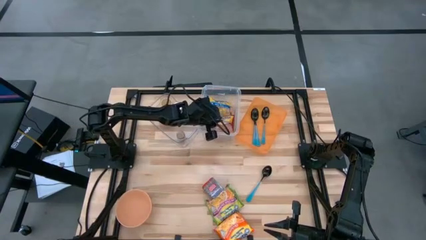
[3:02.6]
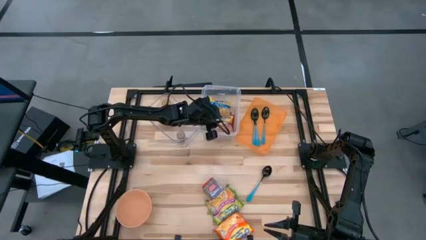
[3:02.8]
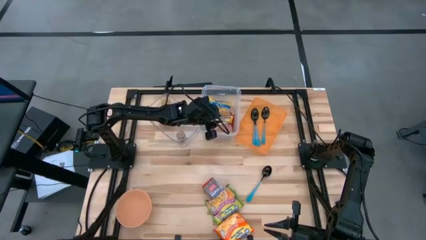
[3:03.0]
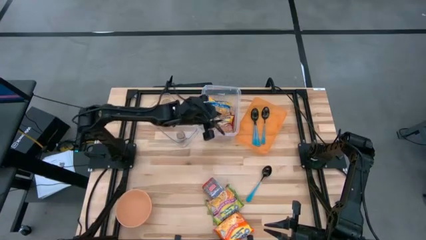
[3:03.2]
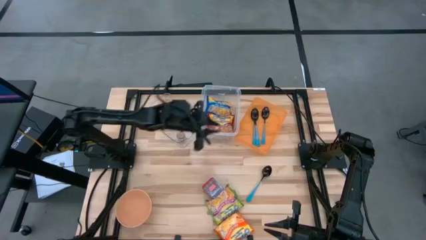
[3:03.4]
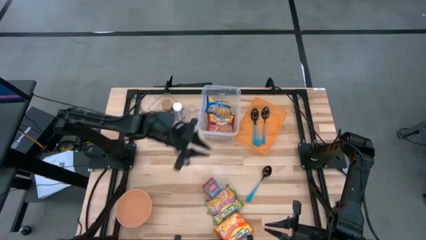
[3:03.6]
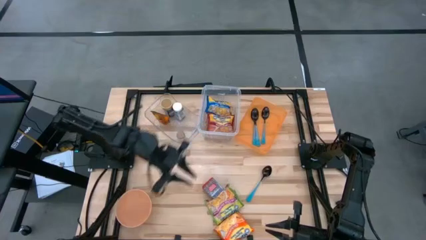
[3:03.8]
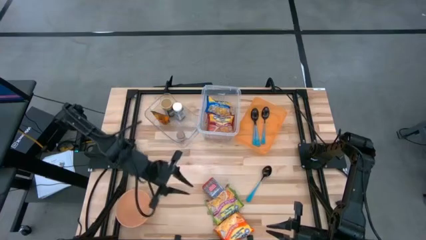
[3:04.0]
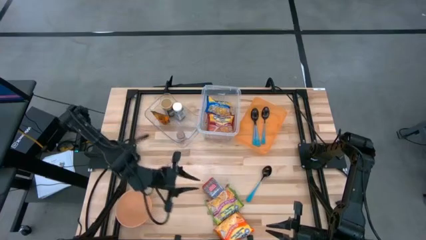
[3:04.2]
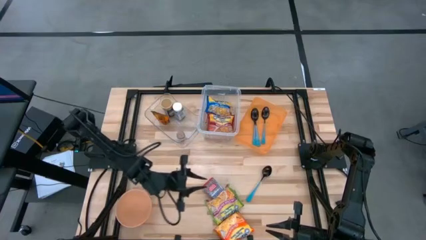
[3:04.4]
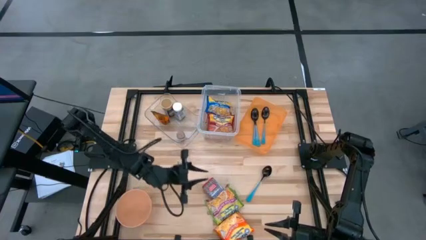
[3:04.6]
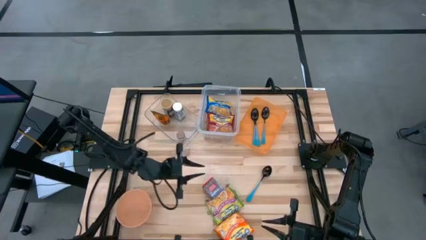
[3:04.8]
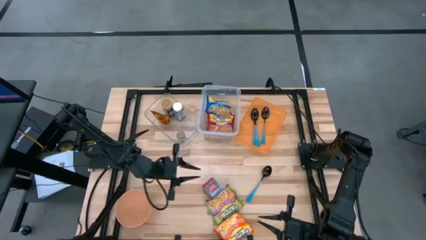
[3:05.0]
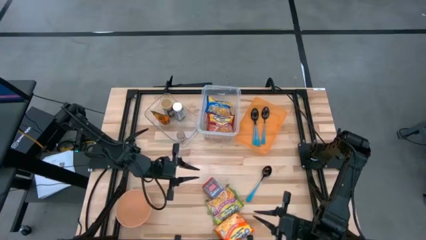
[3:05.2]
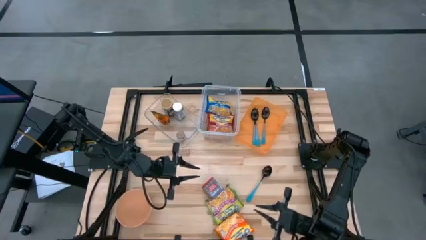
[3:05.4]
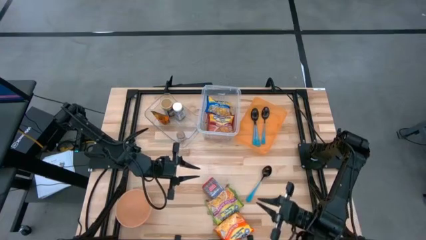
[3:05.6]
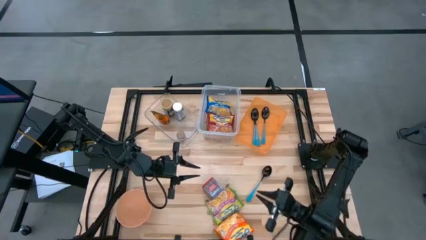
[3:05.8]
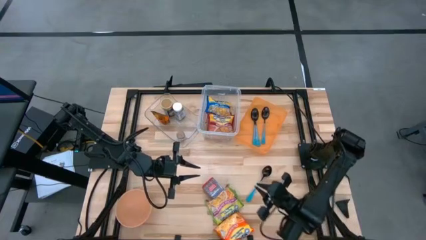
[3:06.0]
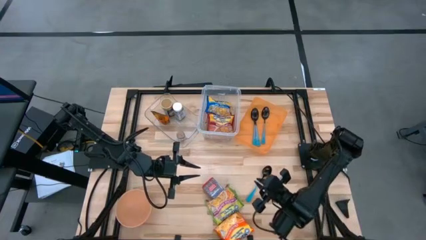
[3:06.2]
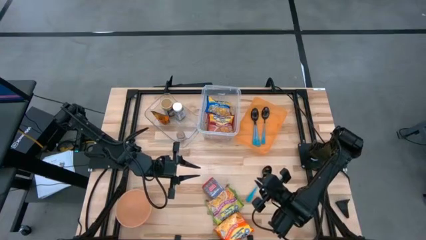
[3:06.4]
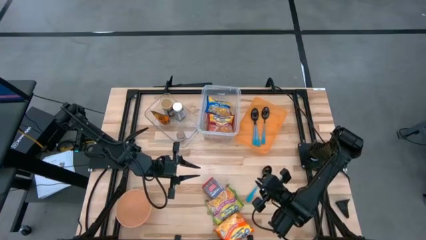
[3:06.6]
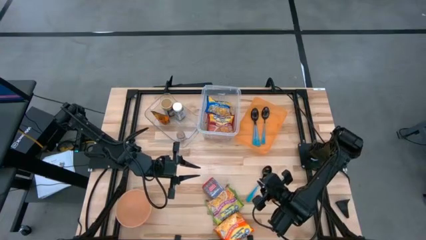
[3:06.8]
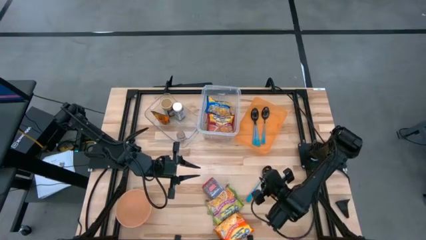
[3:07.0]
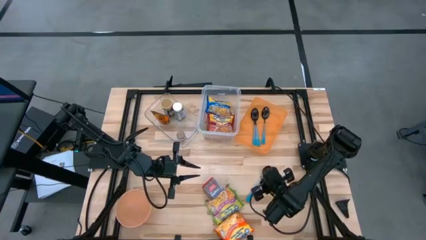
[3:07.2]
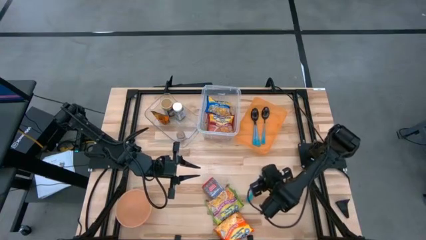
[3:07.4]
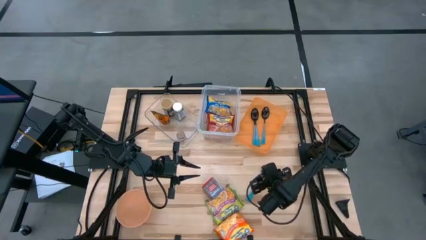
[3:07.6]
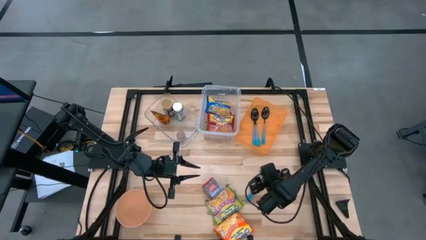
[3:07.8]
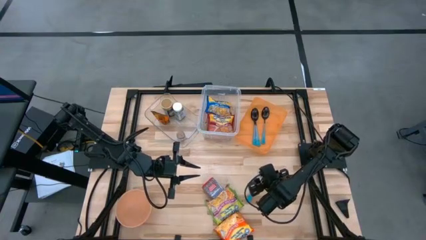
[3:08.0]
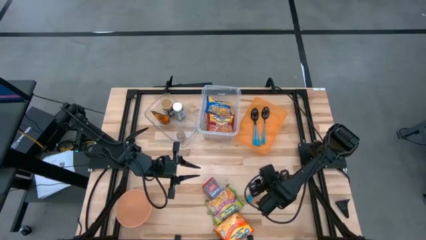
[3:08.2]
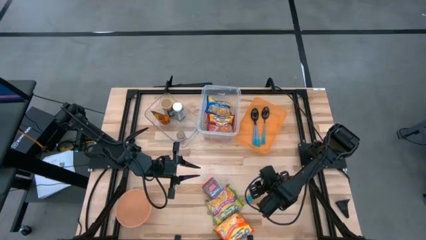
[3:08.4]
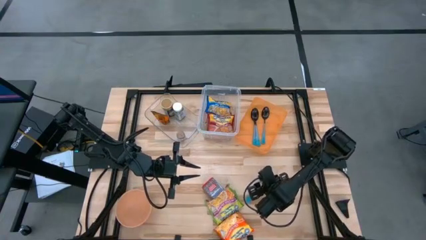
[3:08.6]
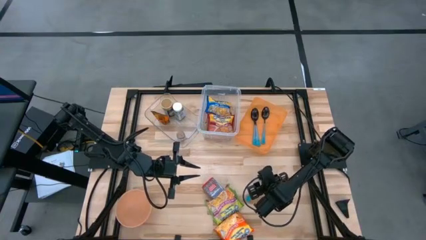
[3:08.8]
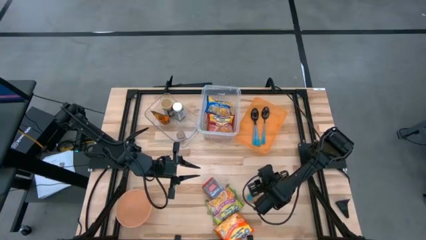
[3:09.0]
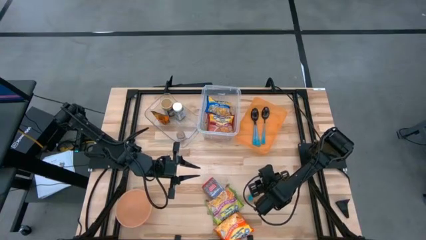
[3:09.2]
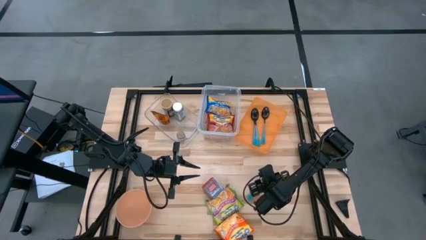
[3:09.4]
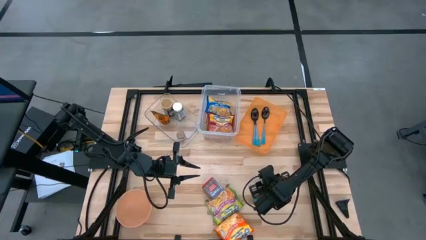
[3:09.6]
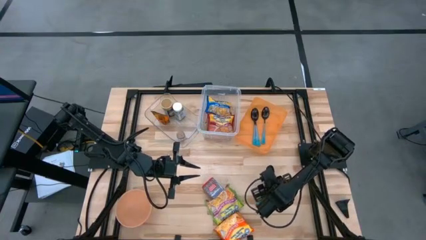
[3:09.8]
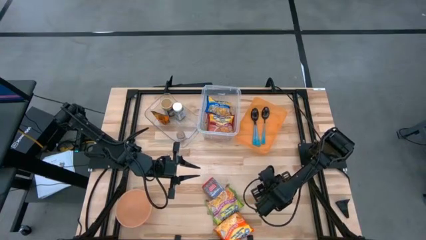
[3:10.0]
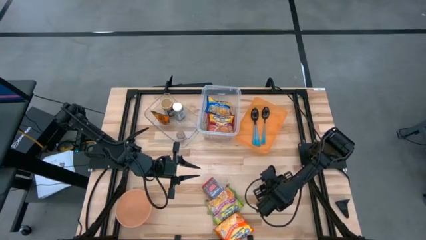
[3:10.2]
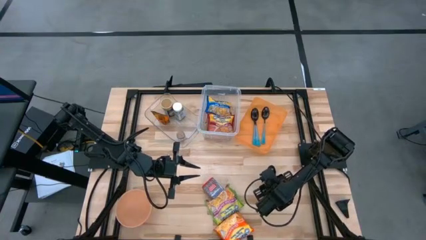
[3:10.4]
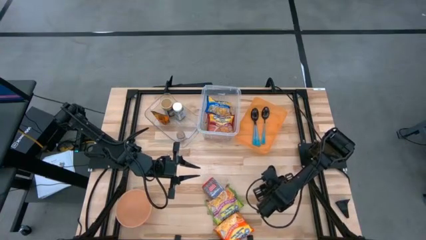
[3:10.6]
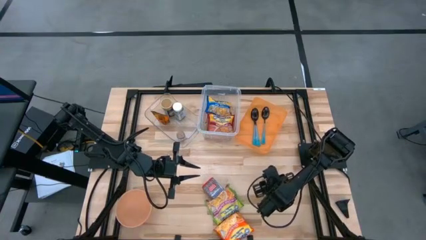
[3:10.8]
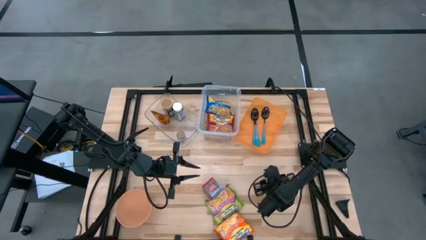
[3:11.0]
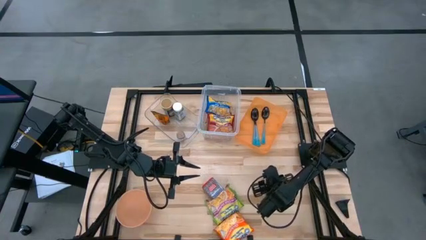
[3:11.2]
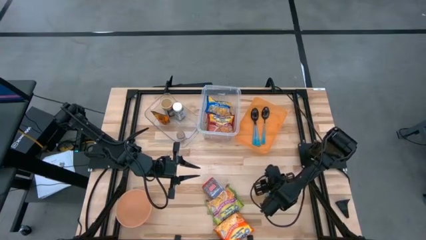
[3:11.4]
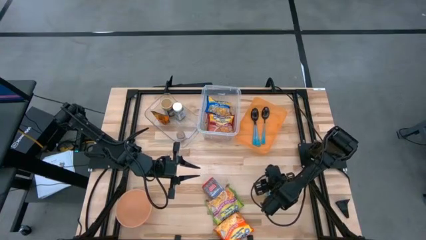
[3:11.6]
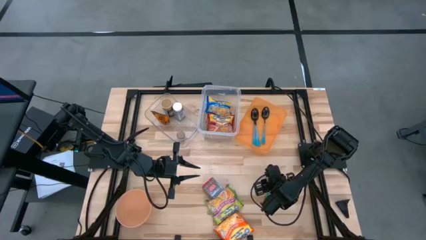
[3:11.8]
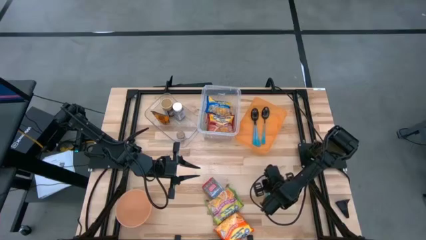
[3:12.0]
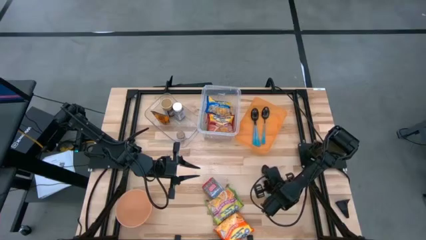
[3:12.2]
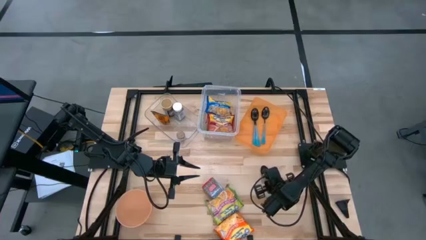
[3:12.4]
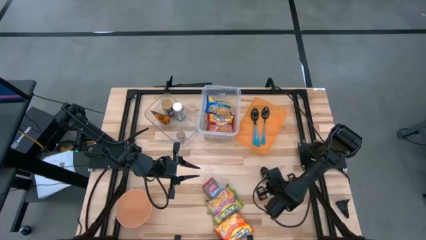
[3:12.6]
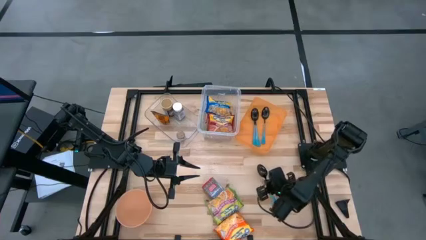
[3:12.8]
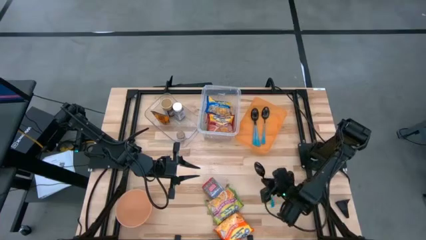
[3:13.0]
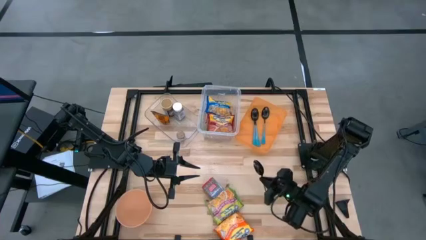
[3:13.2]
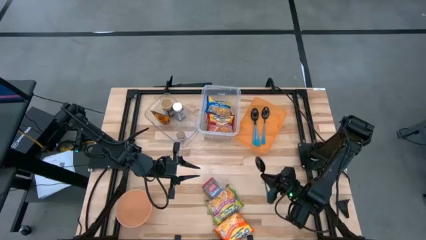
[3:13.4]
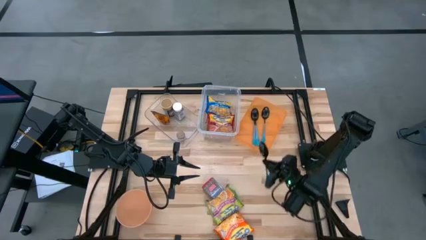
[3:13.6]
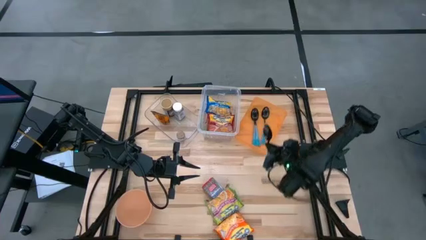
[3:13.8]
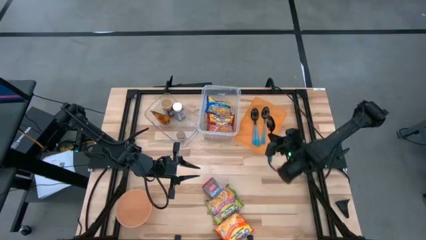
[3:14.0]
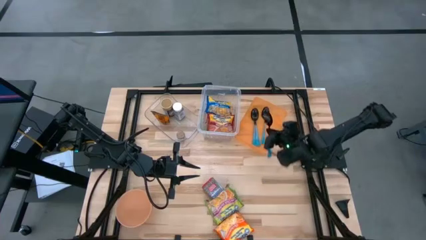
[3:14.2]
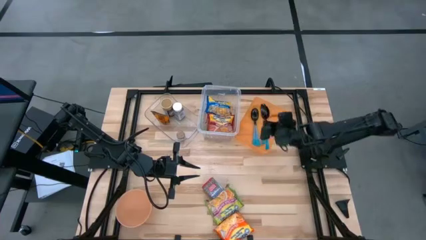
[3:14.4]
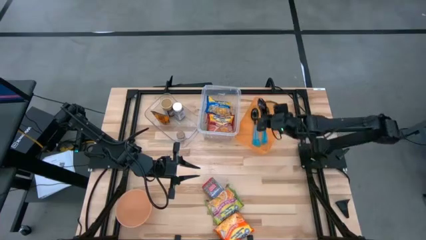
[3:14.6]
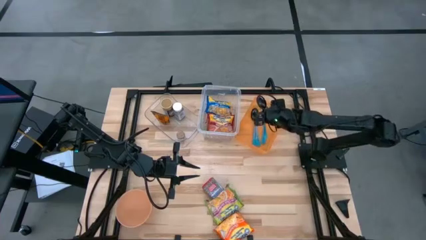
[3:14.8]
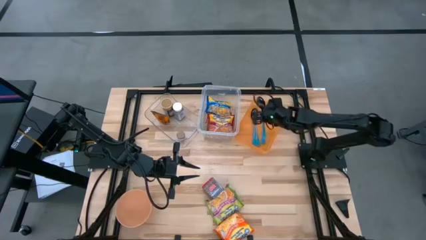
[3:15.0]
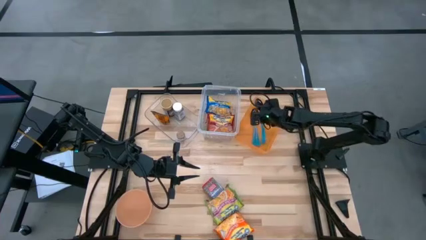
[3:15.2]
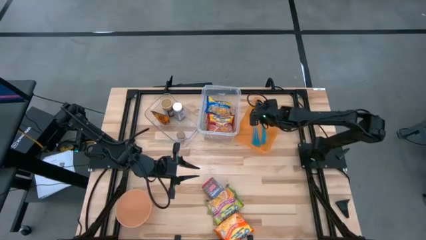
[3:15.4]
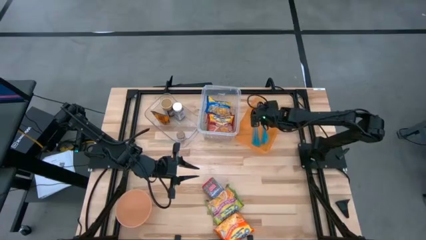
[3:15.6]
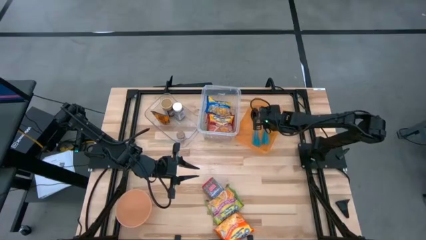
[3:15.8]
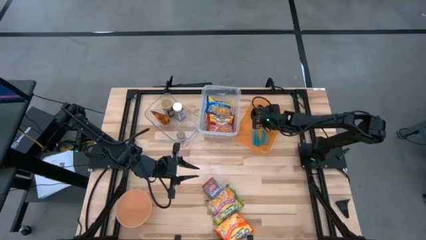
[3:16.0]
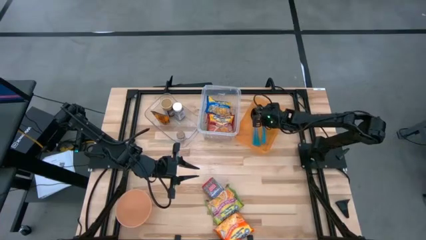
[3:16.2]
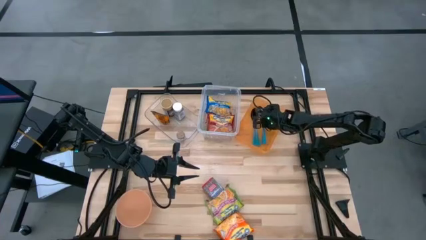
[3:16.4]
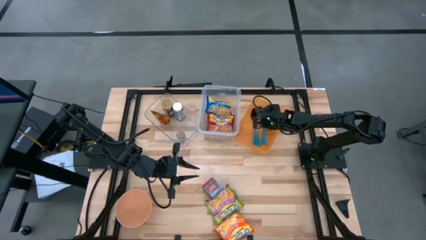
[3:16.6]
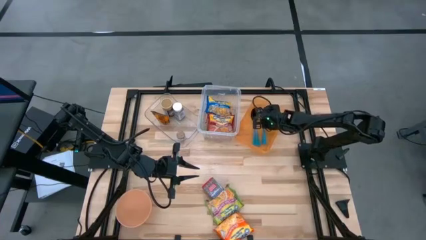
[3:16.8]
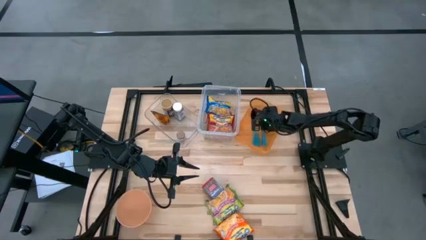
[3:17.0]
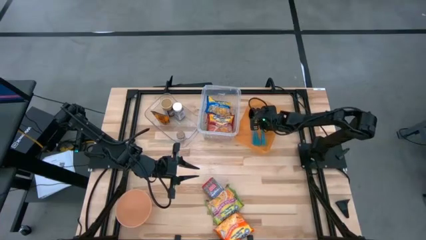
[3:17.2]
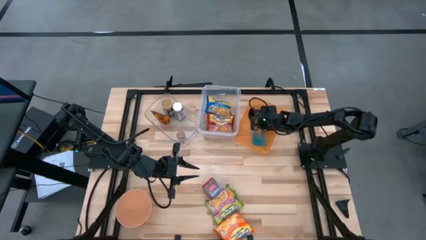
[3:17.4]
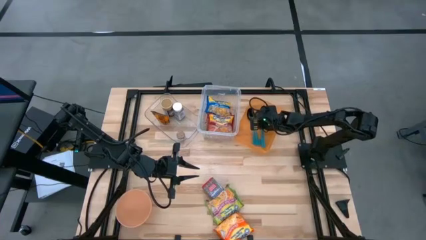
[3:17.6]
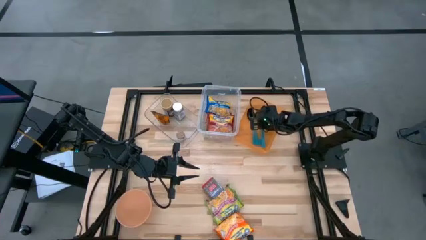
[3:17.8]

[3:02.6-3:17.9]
Task: Pick & Place Food Item
Put the blue spoon into the orange bin

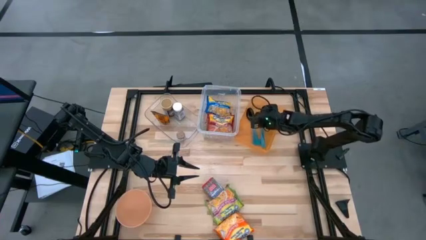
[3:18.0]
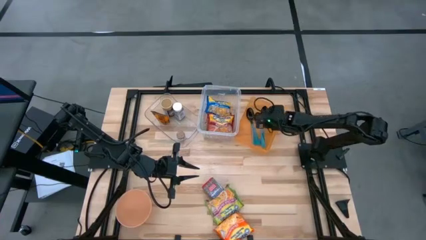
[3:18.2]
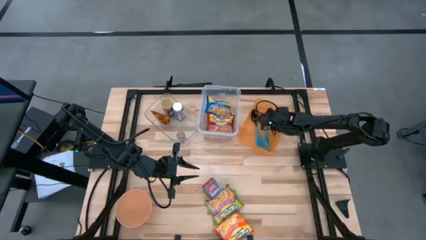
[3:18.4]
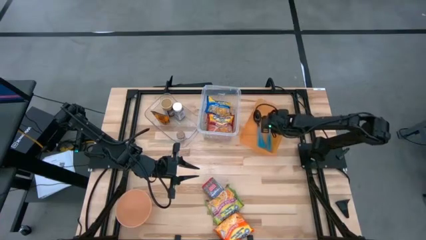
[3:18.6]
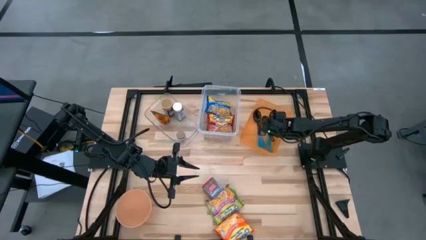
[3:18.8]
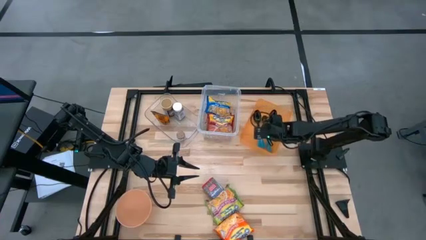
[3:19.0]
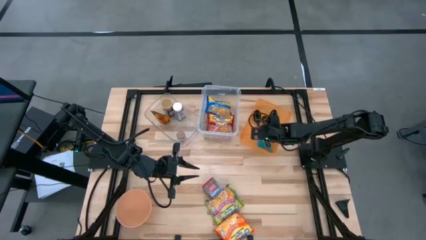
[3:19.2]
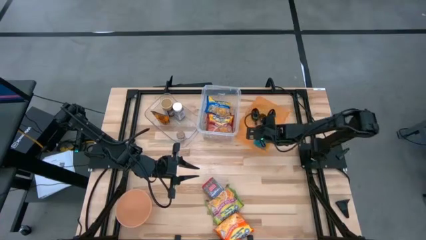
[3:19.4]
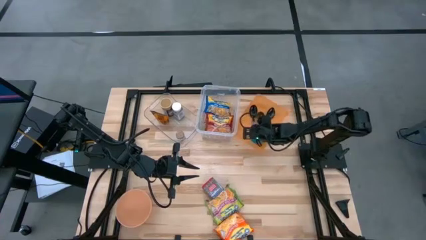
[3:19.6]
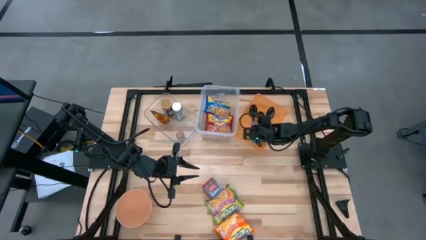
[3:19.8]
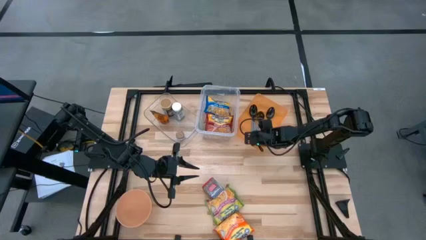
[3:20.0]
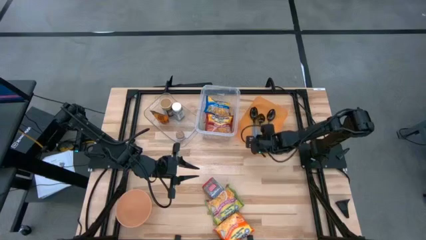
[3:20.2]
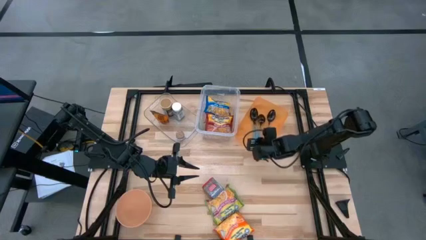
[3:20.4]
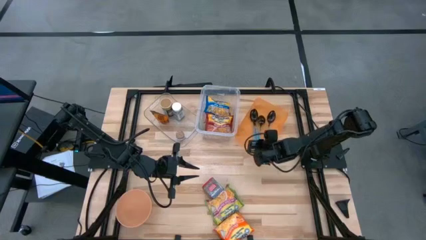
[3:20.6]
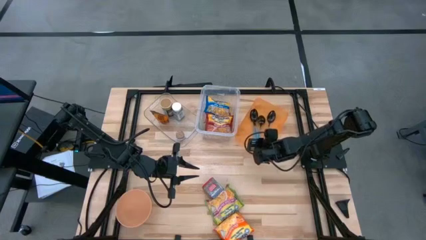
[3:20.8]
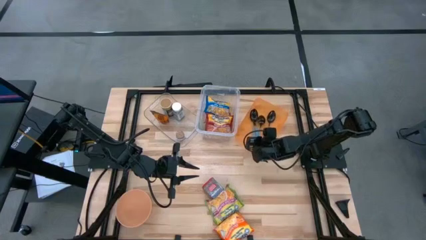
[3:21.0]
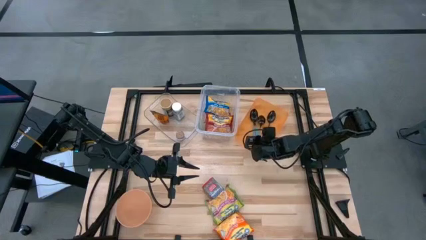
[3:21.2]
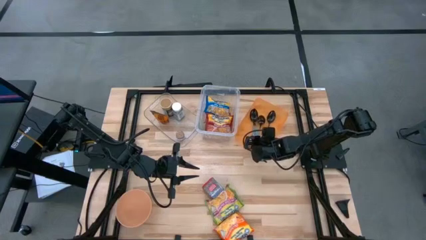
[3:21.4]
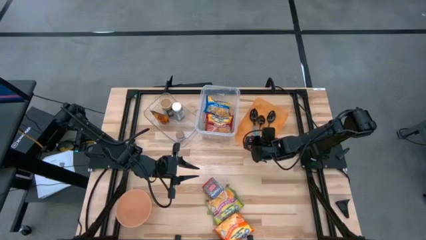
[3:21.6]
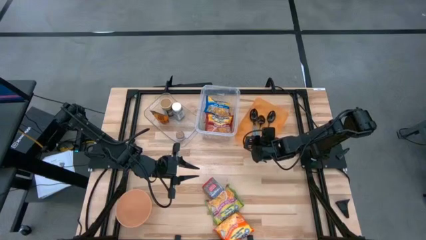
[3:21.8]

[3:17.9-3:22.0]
Adjust the orange bin
